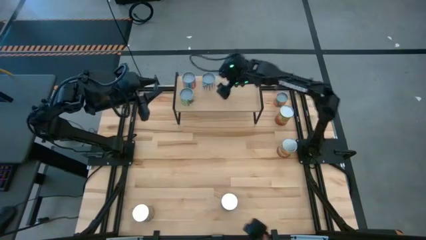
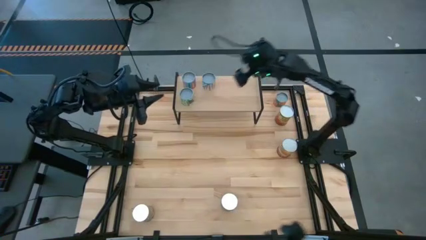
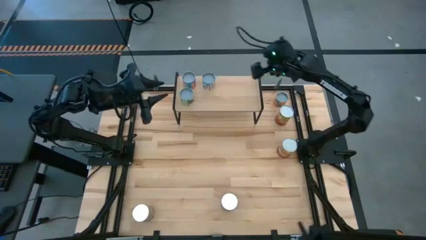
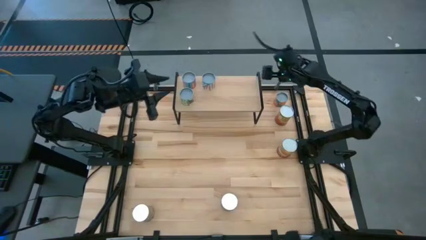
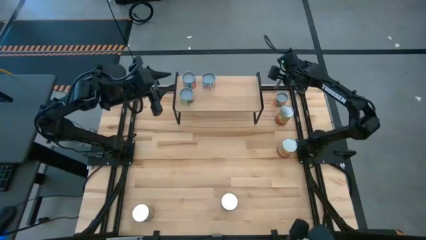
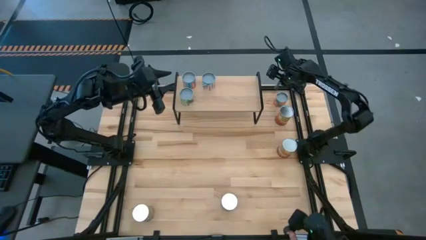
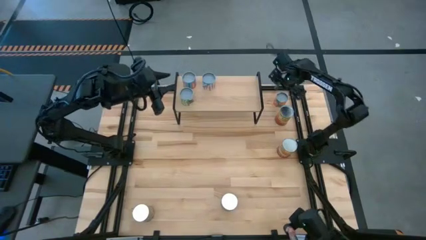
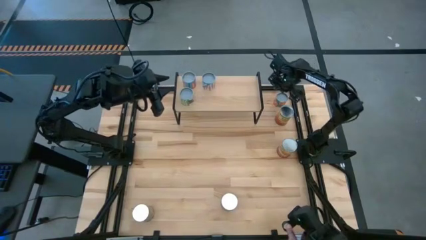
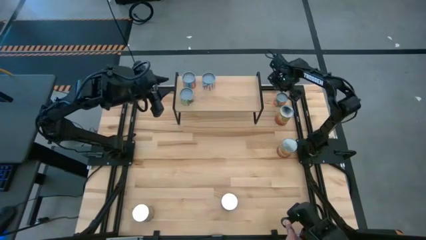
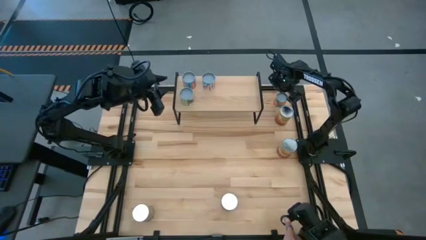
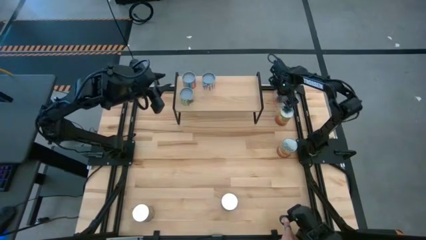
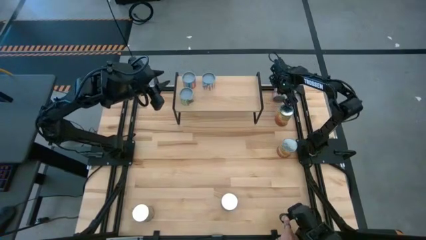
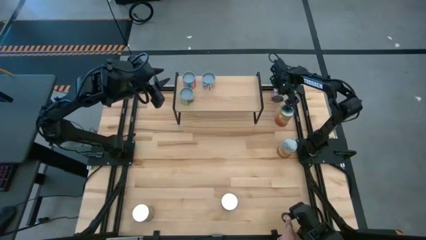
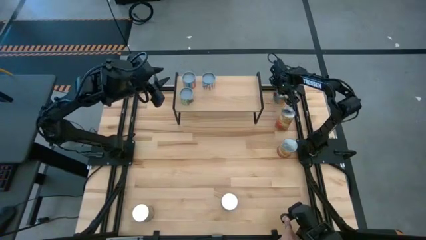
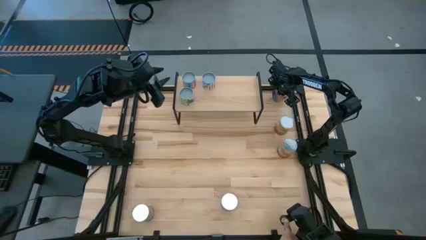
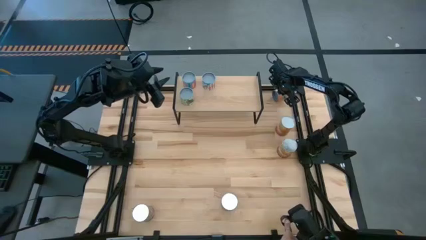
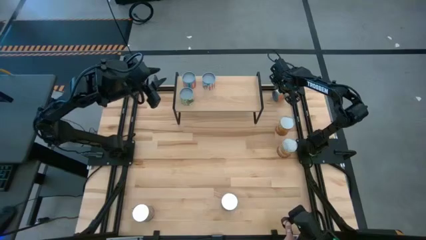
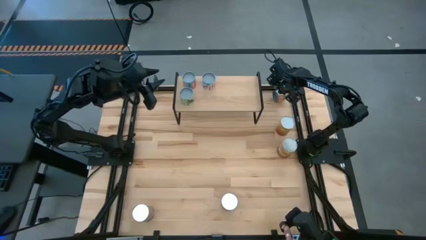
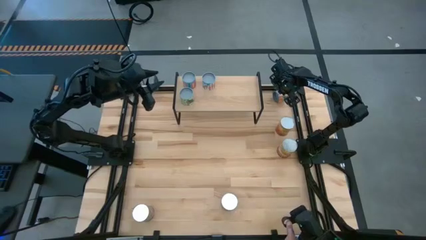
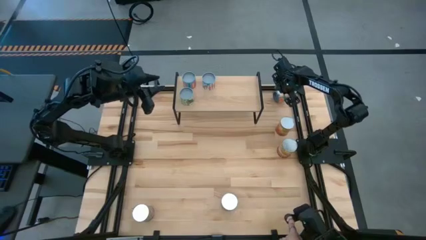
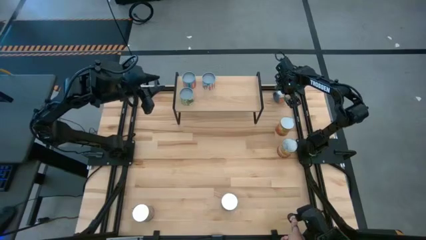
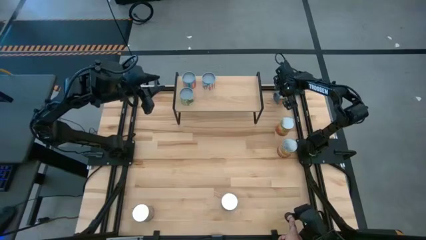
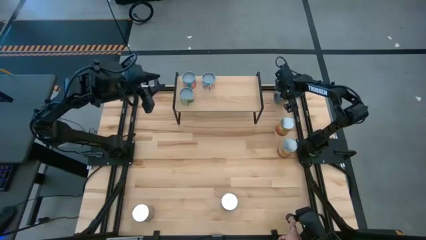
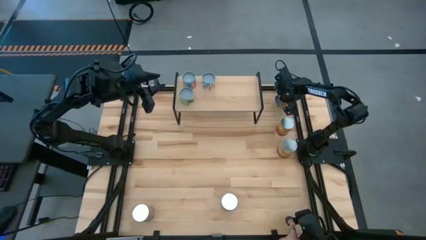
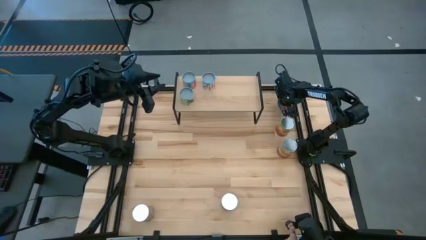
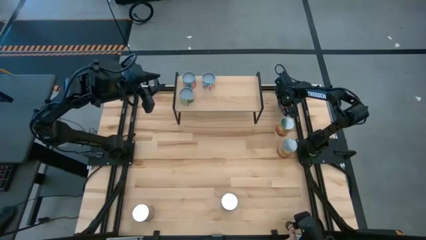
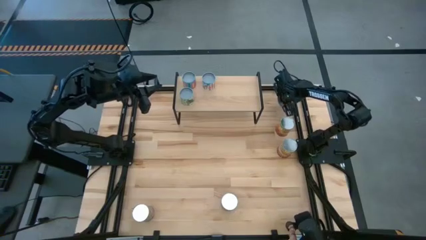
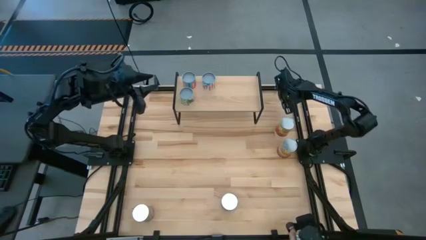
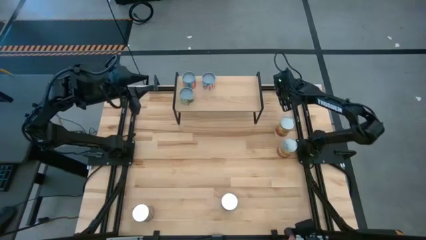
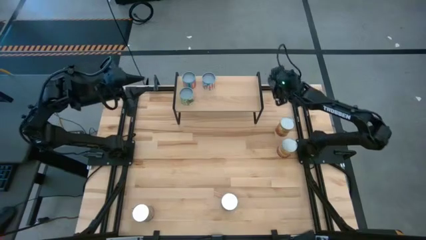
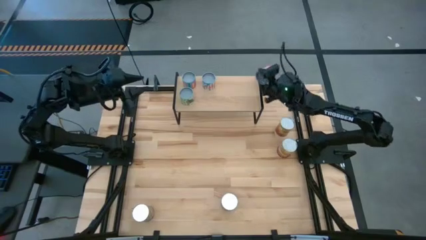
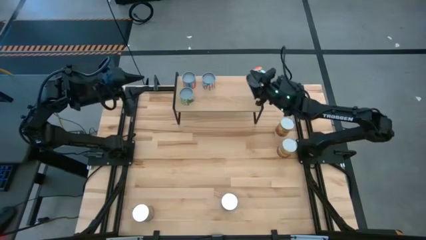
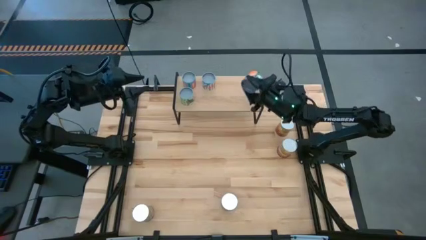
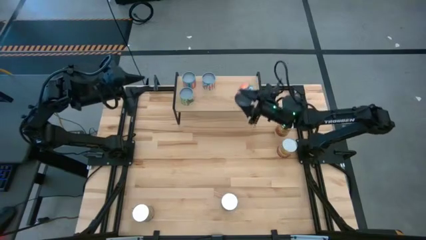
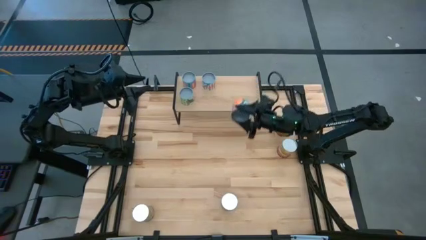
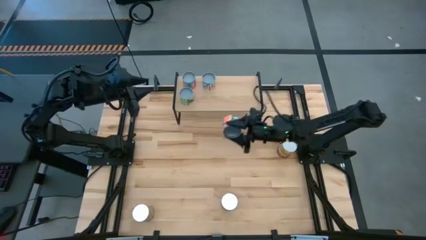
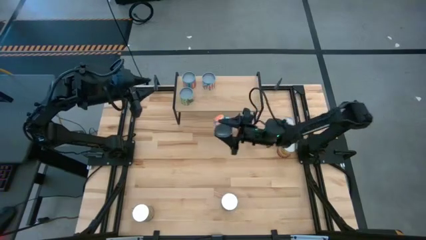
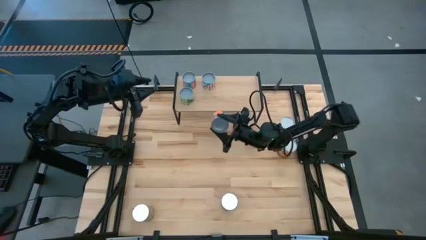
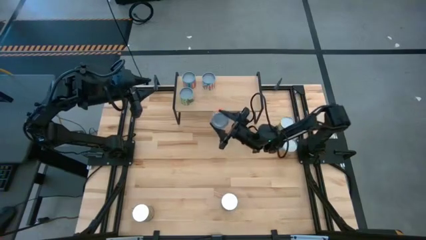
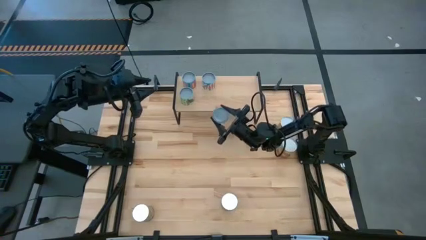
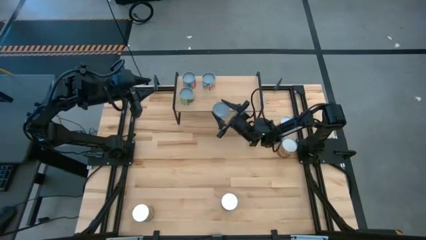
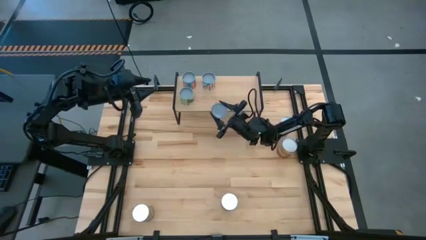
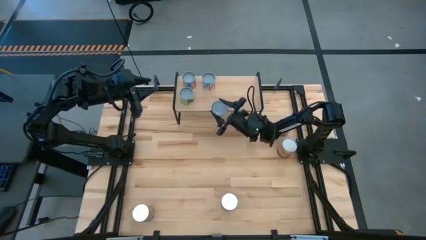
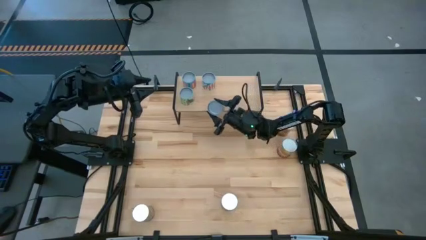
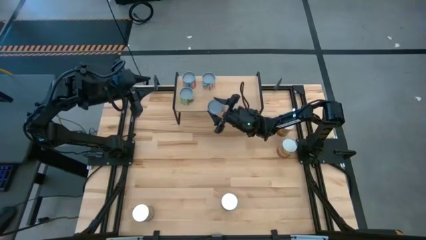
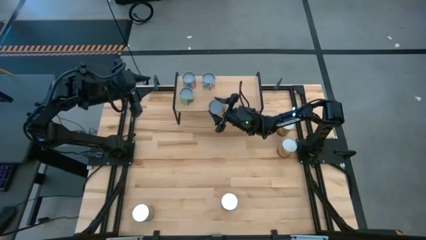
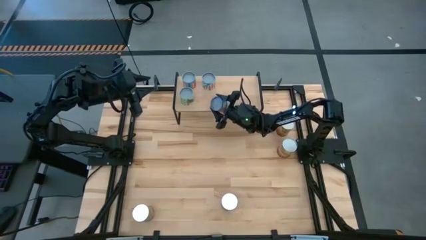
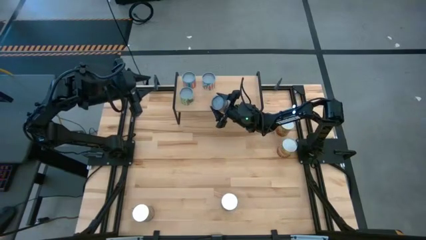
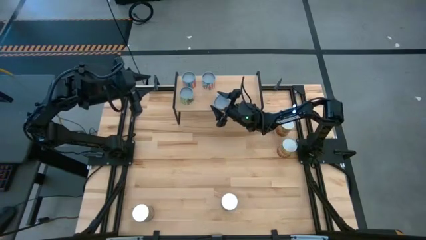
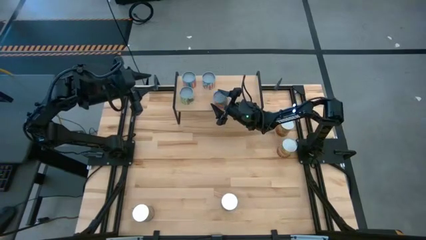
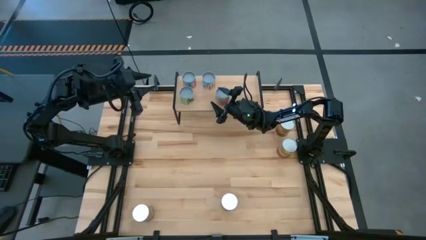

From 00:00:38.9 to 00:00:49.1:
Task: Pick and place cans onto a shelf
Put the can of oranges on the shelf aligned with the can of carrots

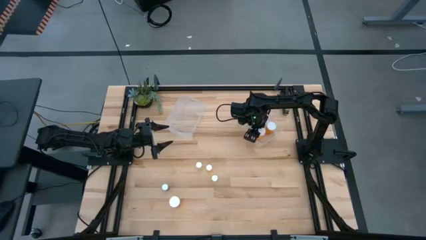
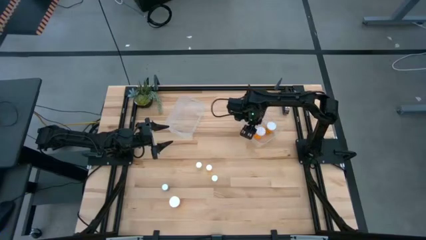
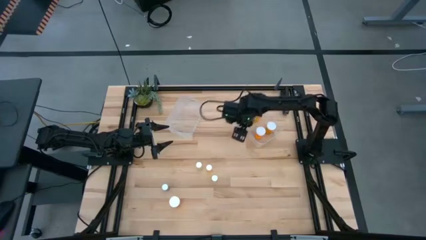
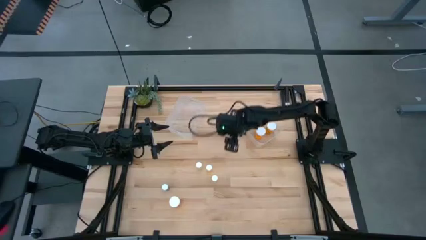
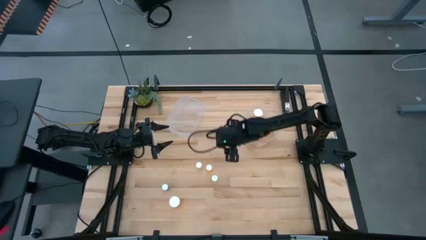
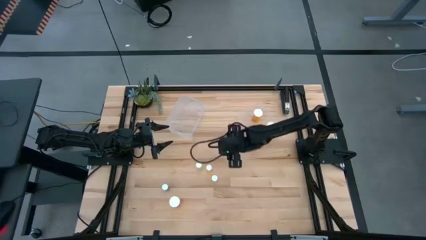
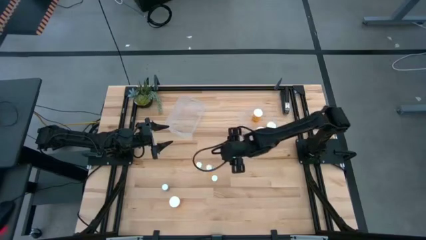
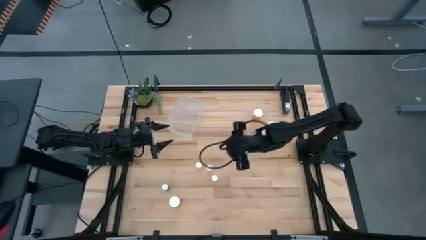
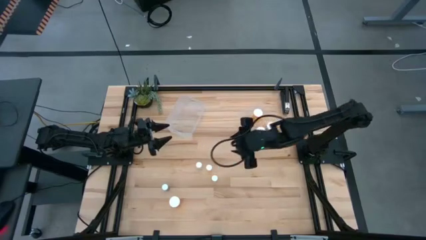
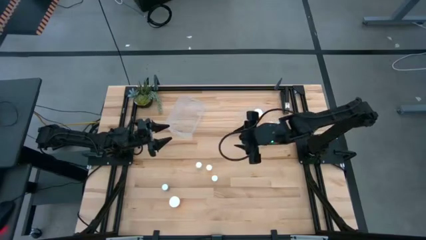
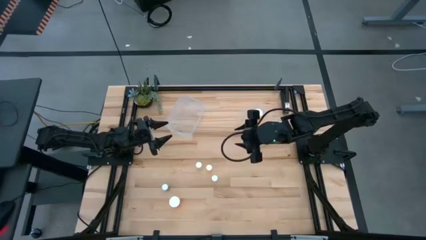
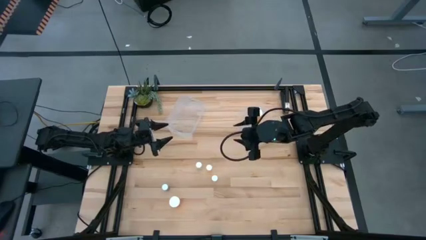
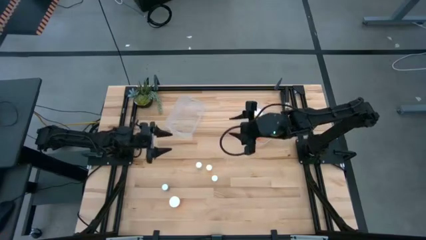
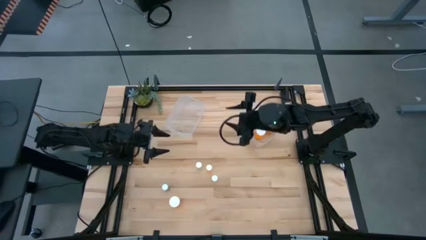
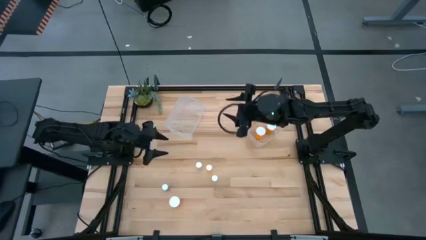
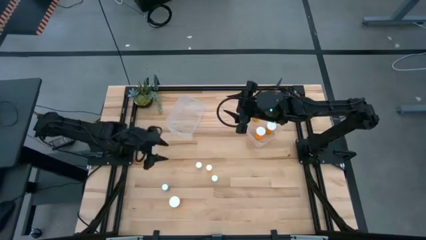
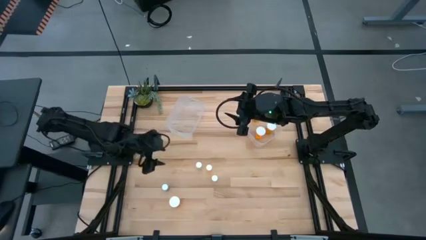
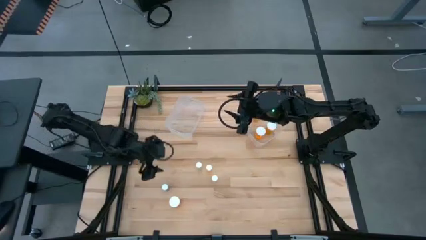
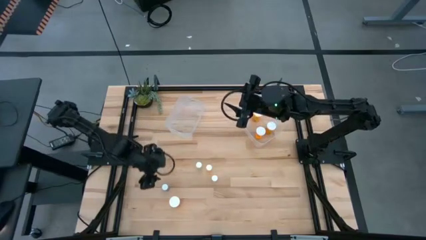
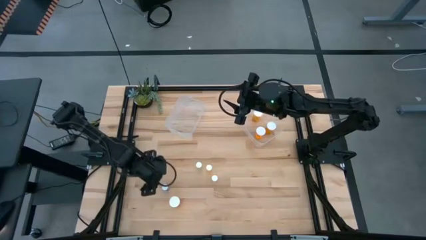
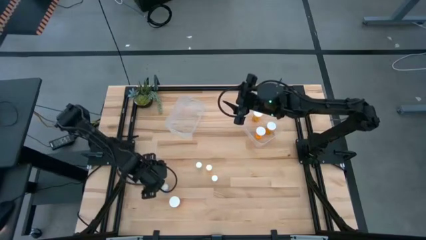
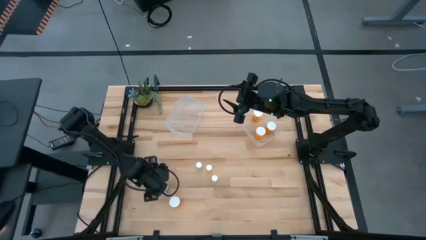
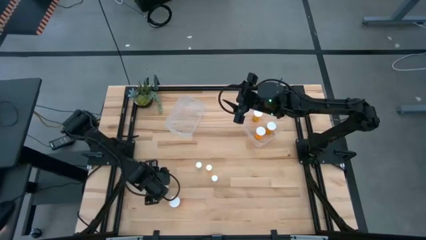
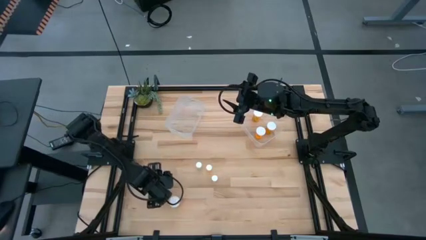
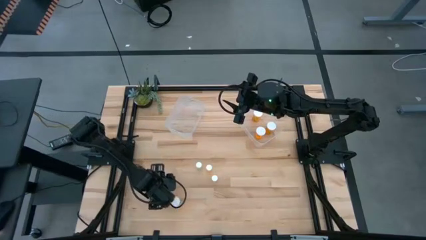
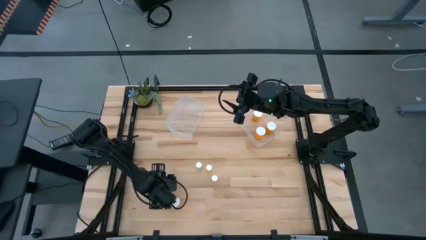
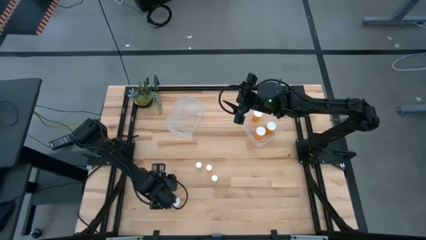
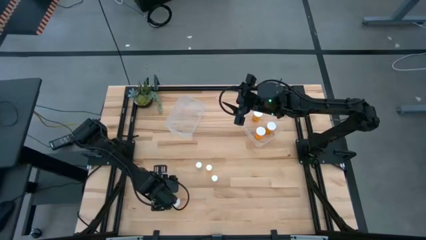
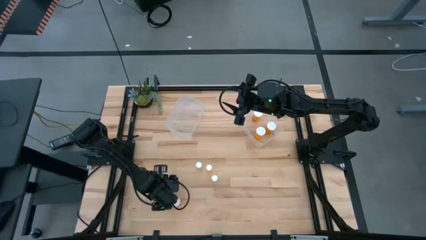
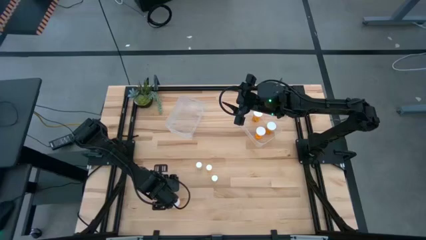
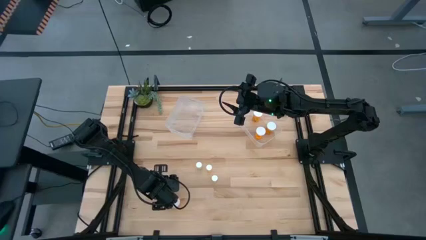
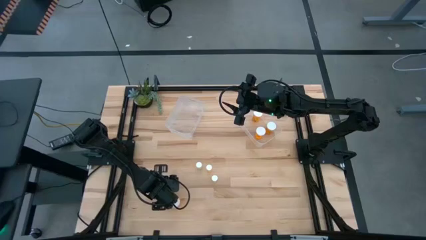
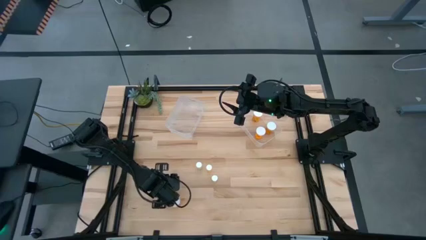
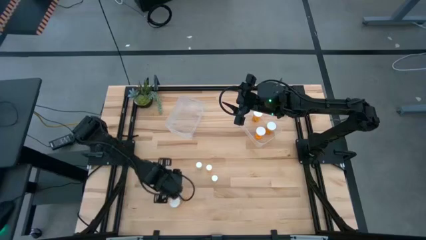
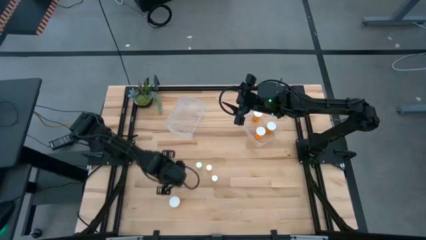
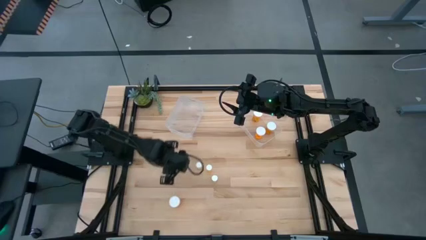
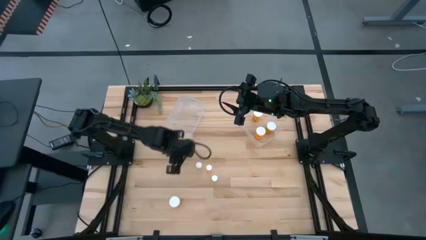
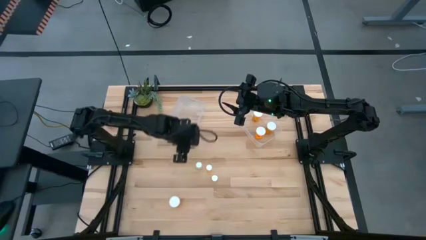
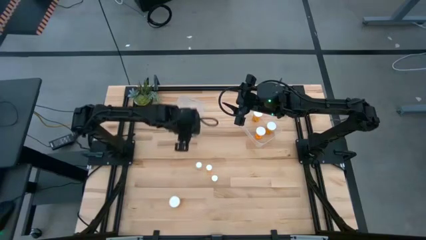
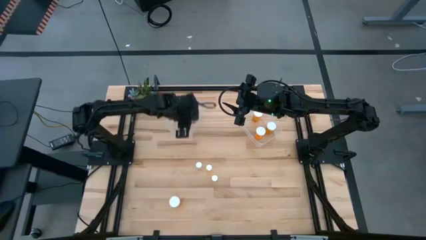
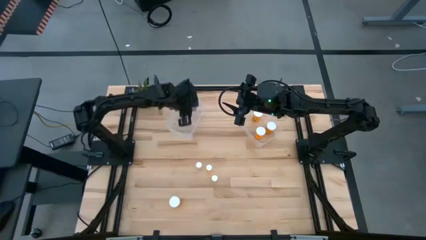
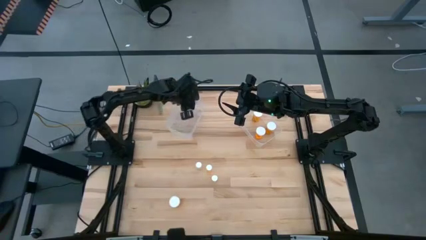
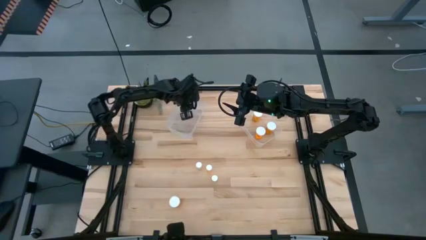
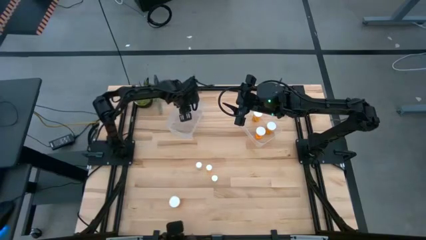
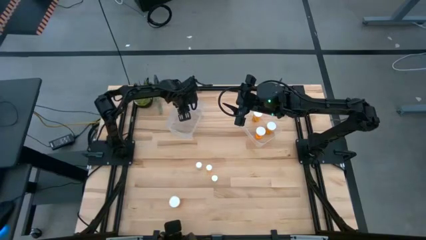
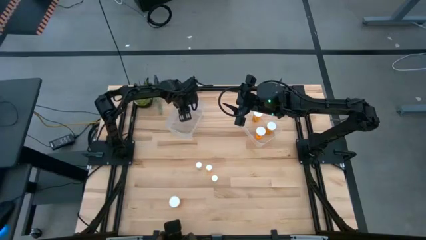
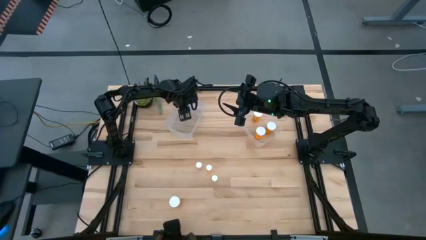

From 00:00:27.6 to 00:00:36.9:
Task: Pick and place medicine bottles into bin by pill shape (circle, oval)
Put the small blue pill bottle into the left transparent bin
